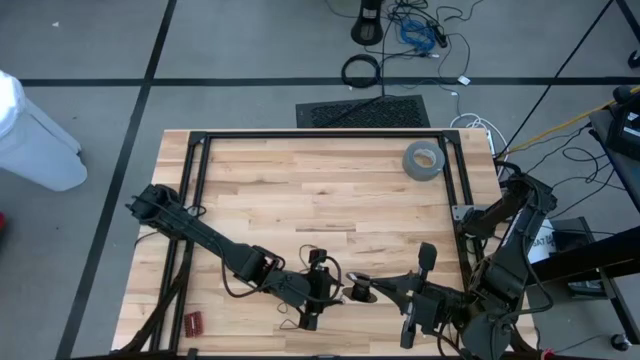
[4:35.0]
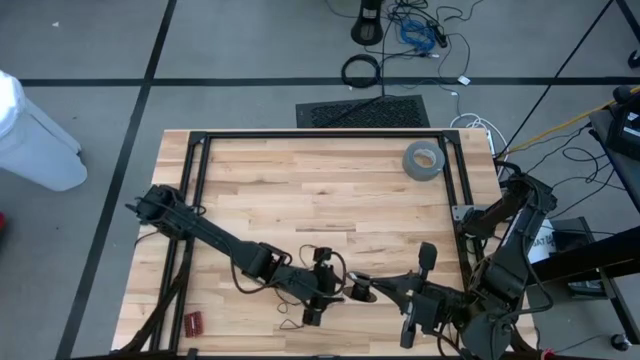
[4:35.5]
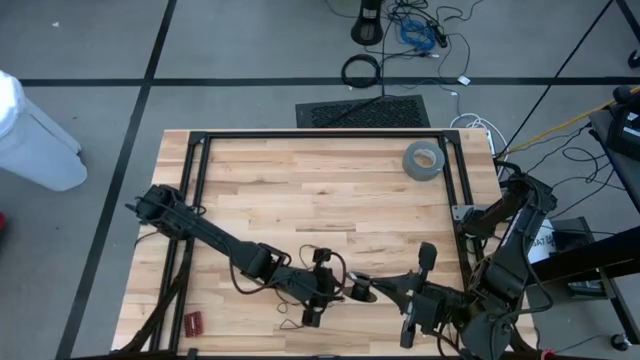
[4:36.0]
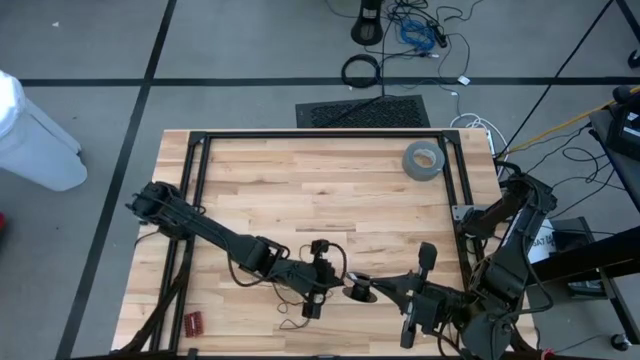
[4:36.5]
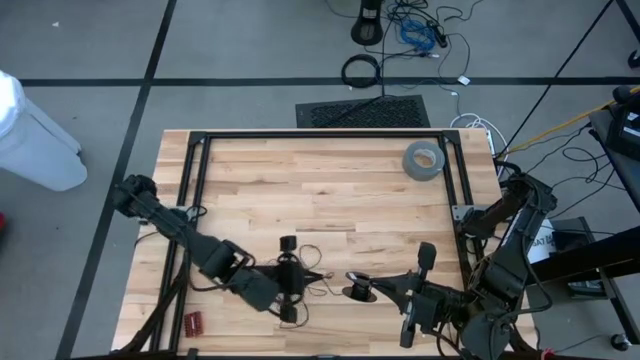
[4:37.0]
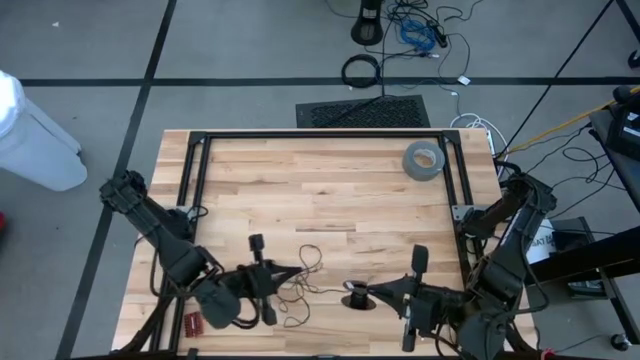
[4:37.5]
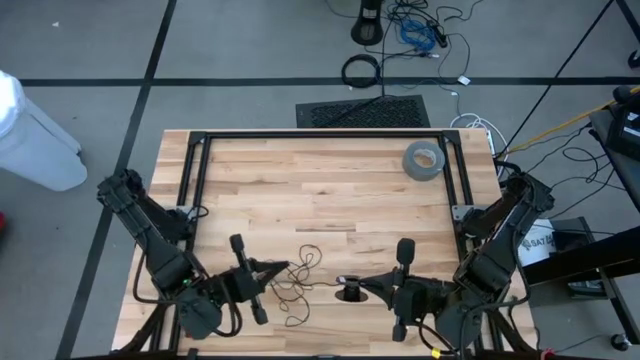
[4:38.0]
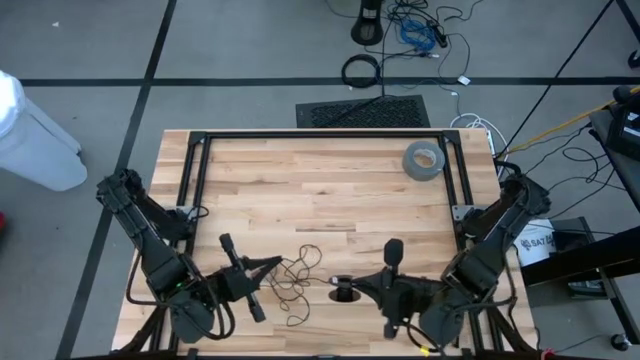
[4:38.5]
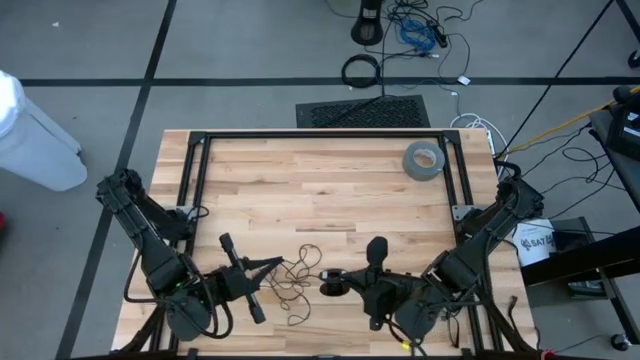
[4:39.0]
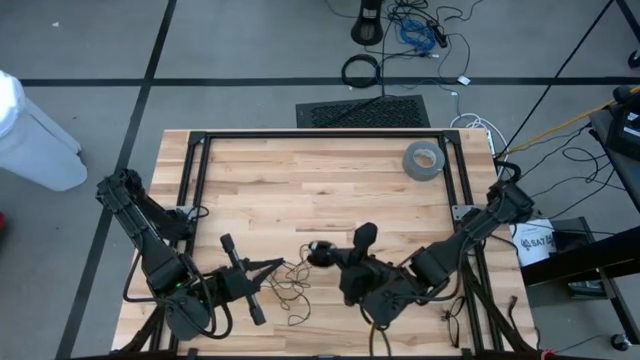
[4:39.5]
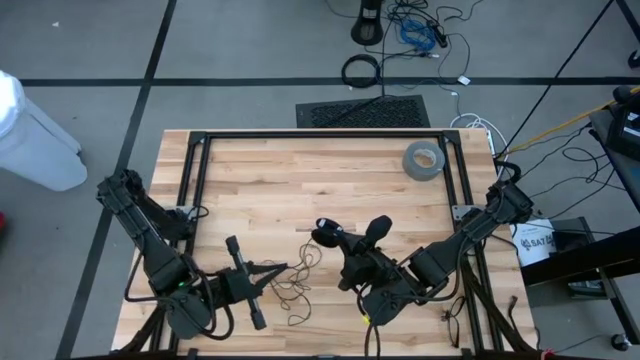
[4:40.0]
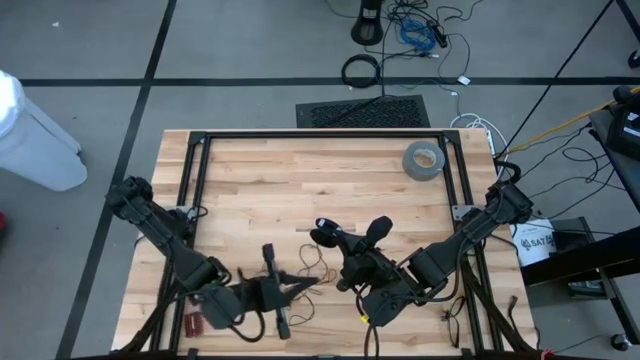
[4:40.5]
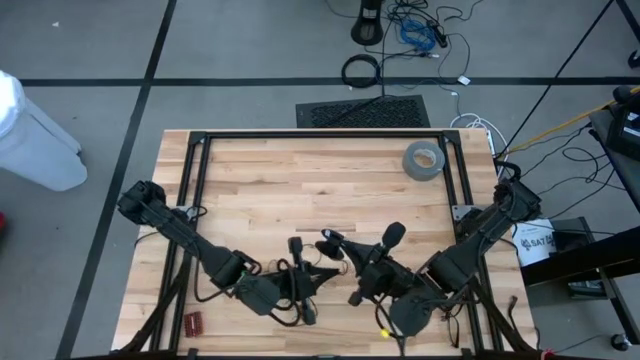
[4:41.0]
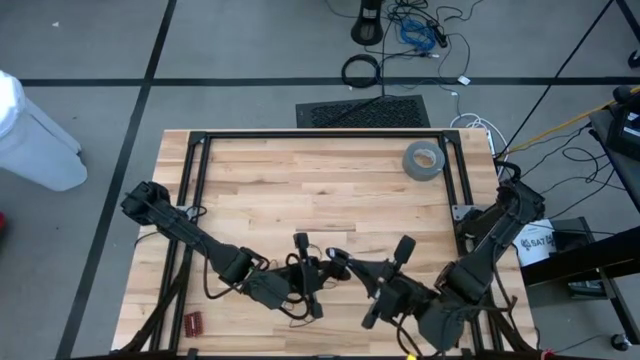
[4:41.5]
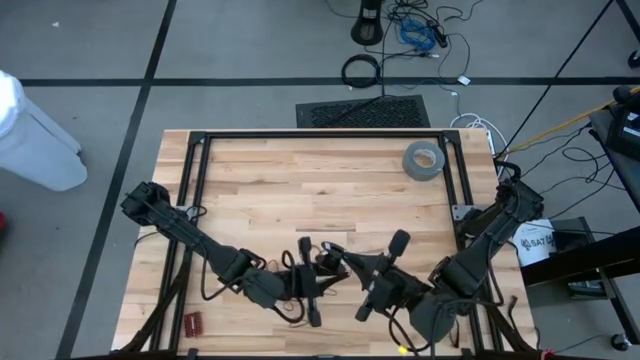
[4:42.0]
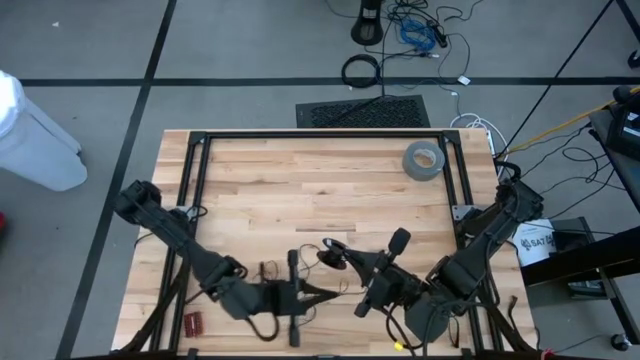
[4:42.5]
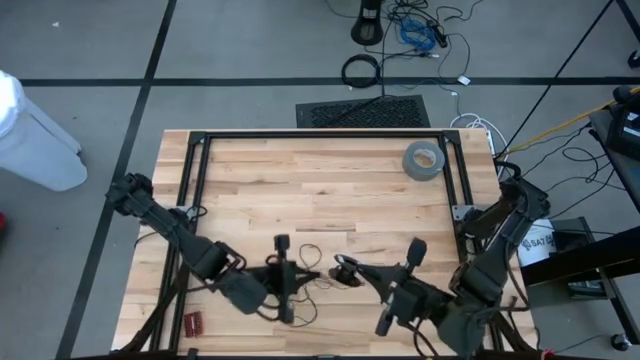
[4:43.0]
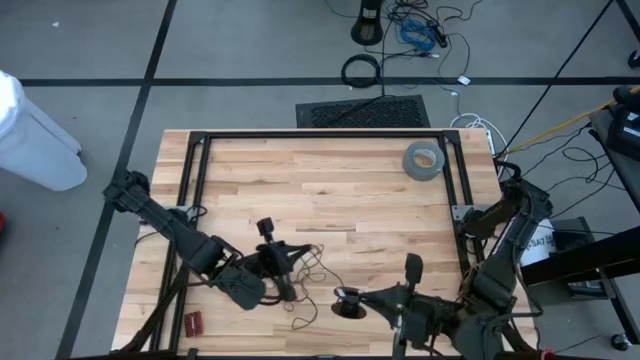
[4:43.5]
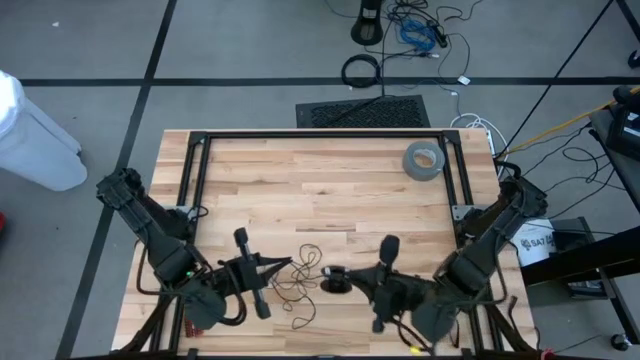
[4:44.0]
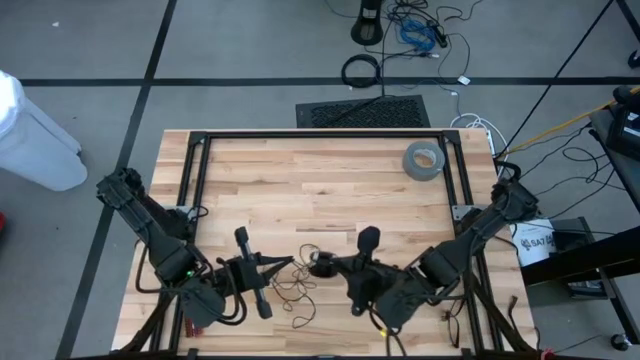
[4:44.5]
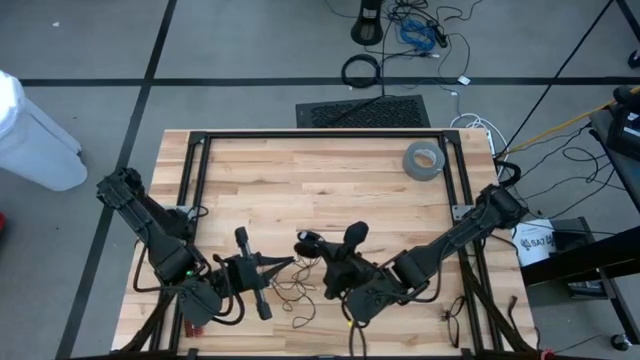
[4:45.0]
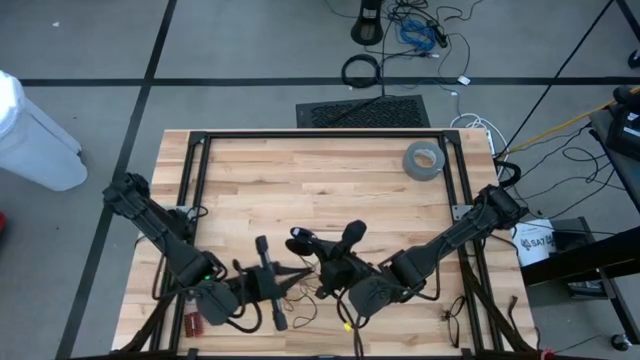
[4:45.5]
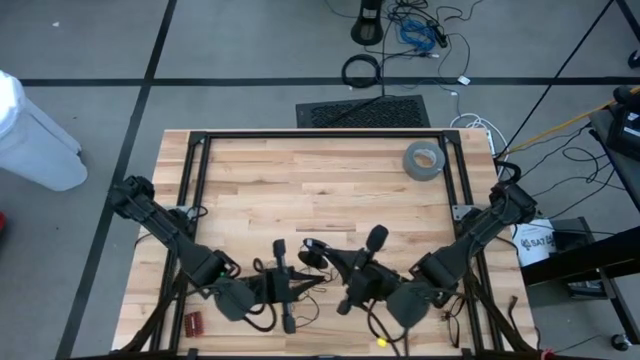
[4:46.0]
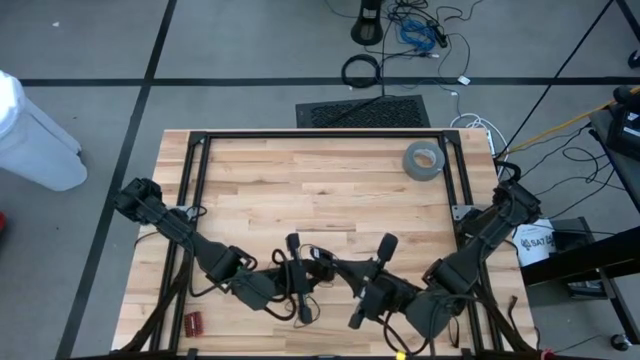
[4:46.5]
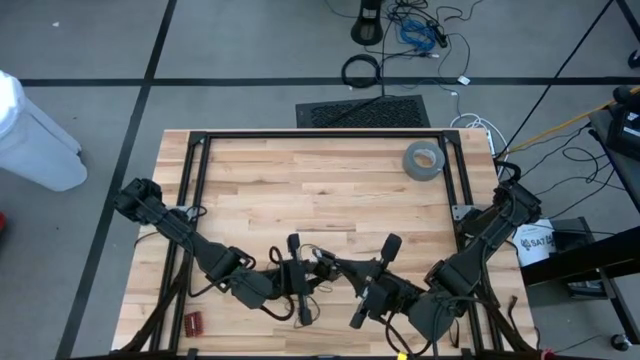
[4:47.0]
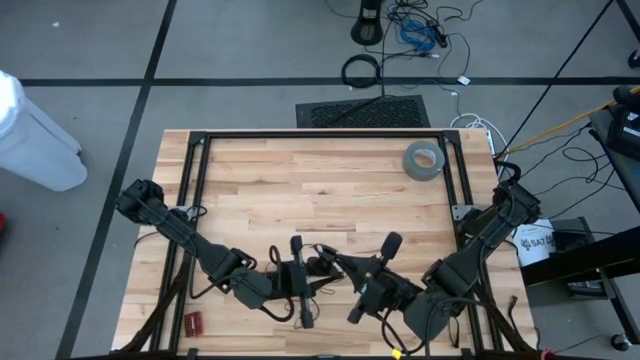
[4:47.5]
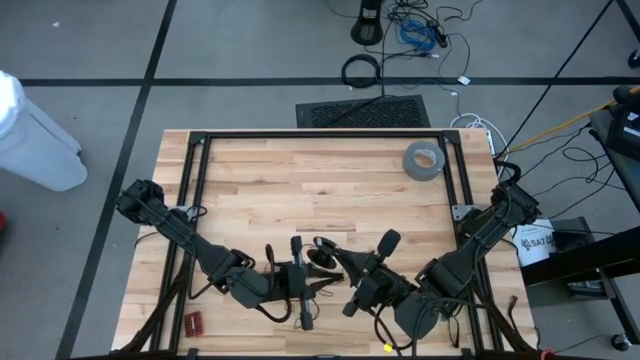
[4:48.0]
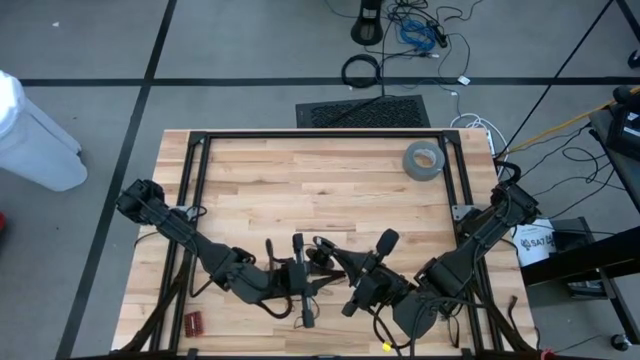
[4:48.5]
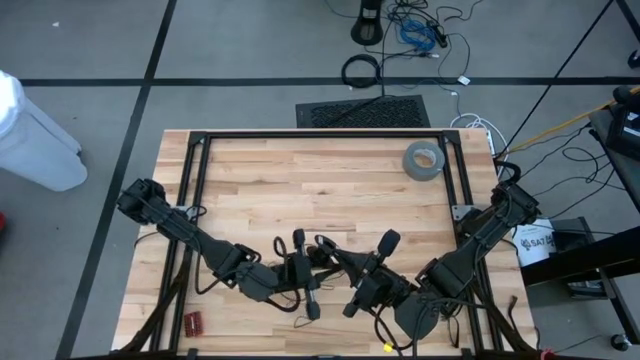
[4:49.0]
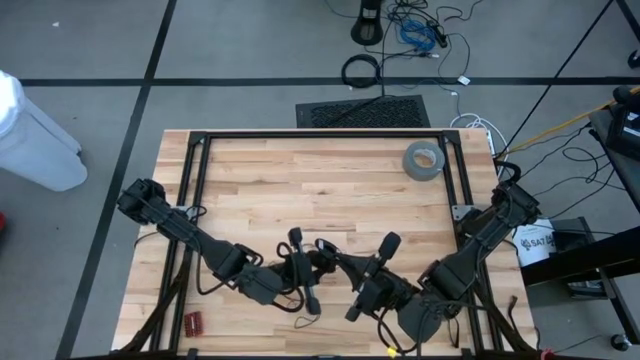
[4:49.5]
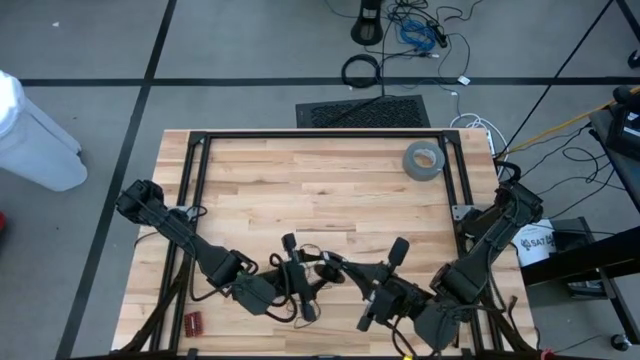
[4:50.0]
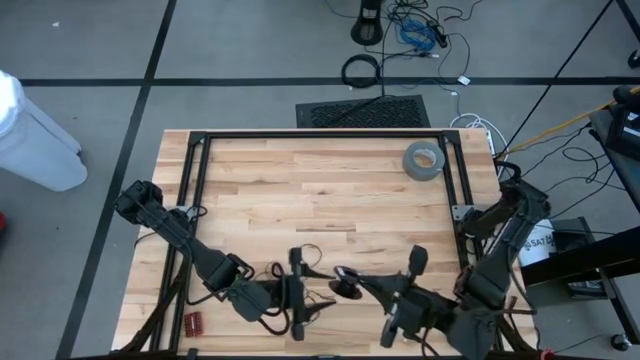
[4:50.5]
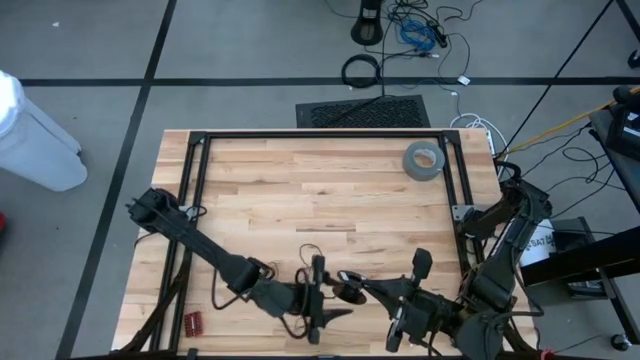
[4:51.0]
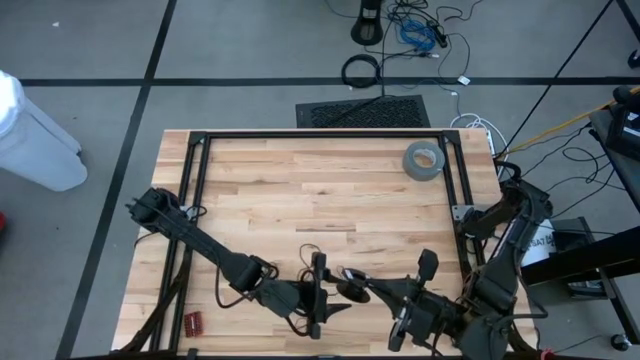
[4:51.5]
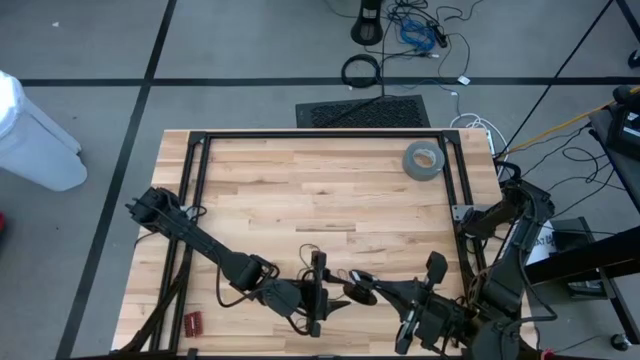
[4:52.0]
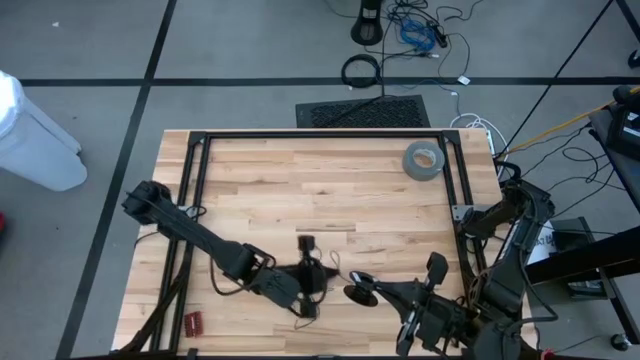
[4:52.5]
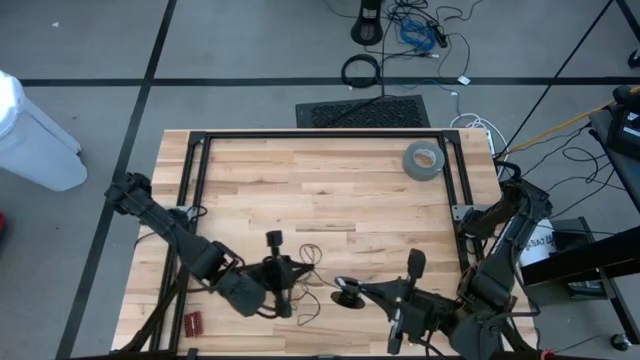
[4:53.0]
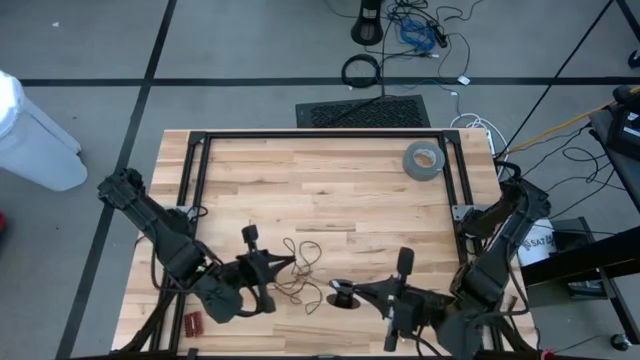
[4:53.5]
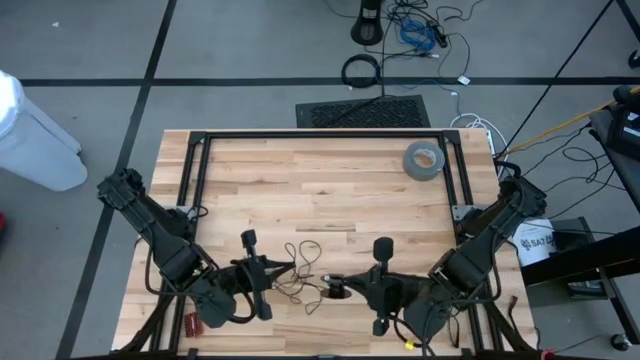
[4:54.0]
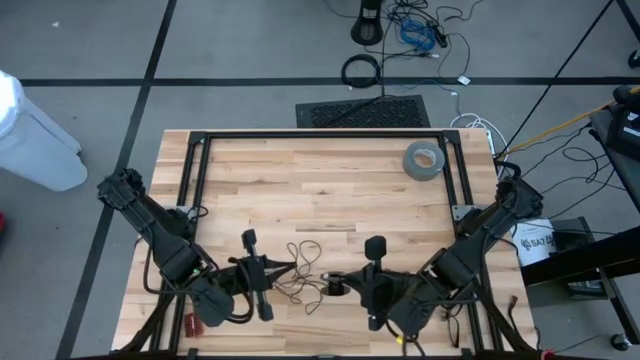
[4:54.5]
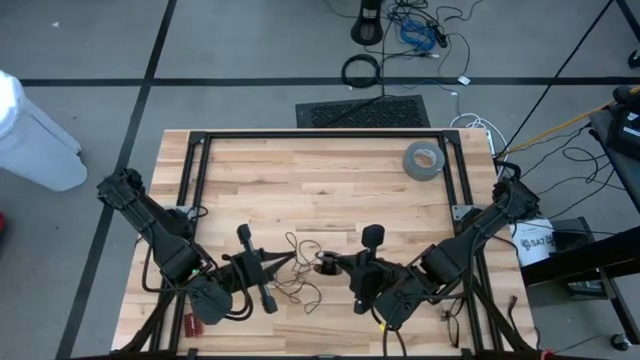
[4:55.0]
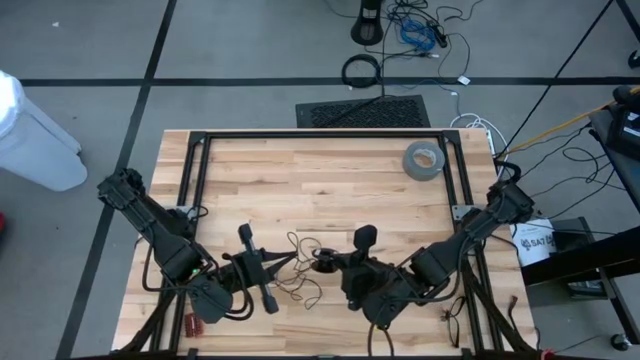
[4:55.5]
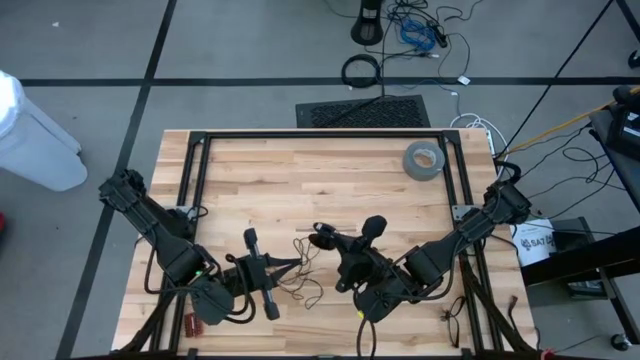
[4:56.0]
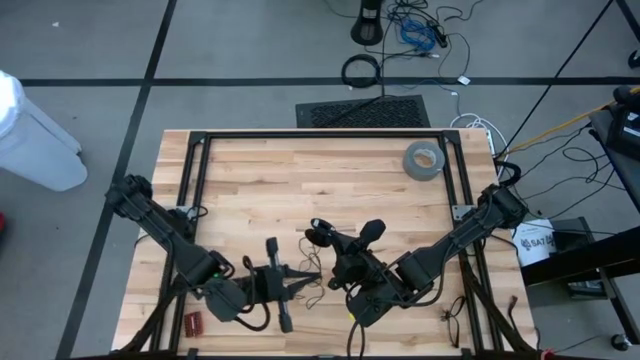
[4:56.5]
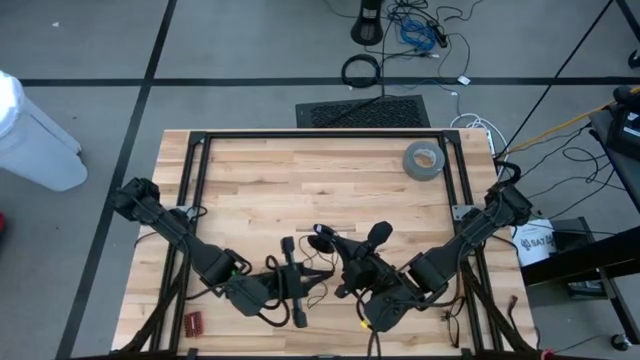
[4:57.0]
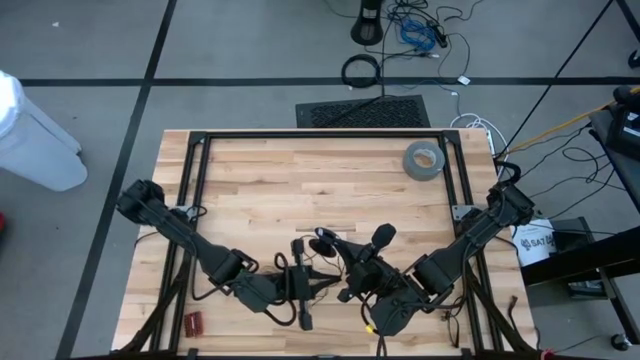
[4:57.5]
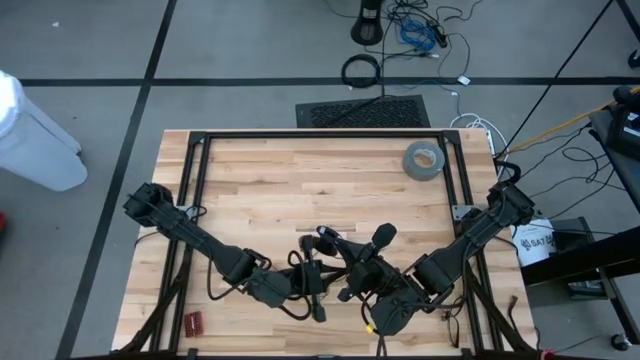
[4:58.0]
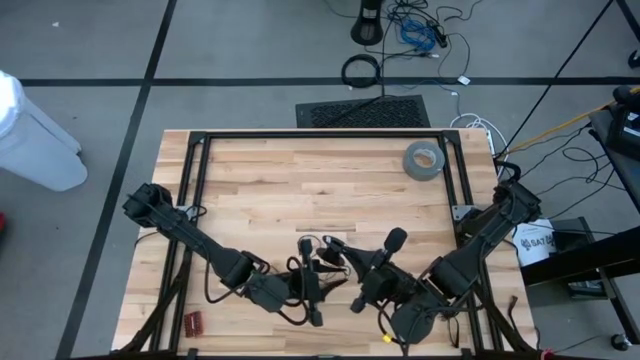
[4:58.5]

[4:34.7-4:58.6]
Task: Coil cords
Coil the black wire onto the spool
